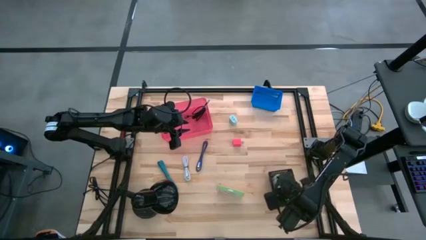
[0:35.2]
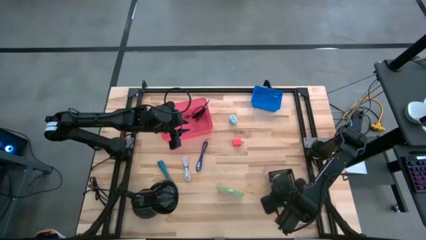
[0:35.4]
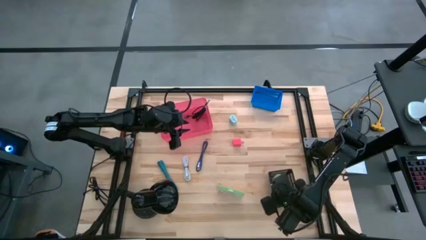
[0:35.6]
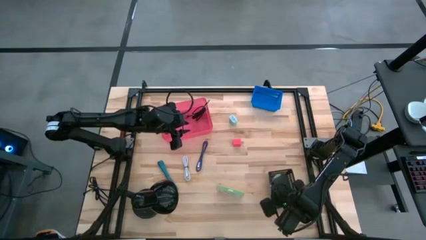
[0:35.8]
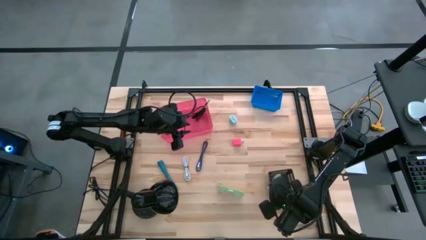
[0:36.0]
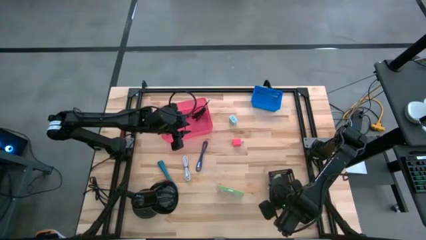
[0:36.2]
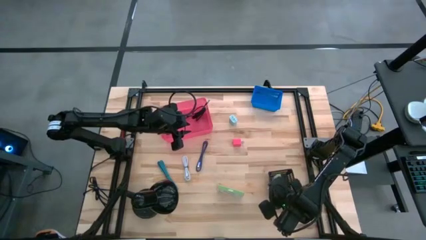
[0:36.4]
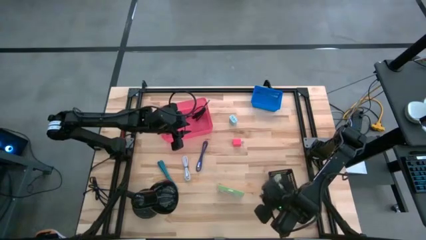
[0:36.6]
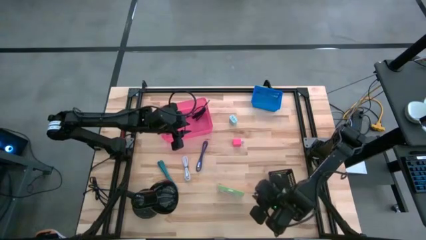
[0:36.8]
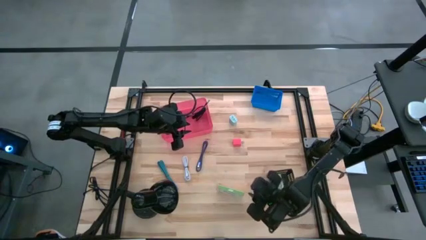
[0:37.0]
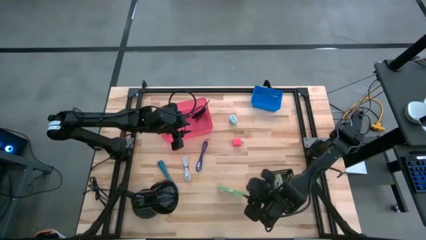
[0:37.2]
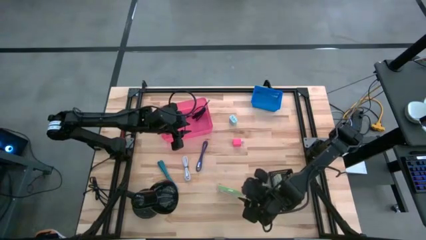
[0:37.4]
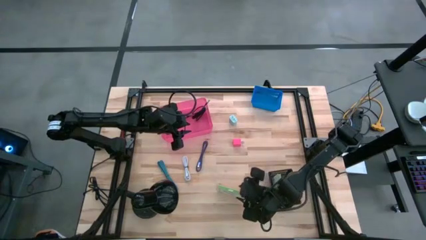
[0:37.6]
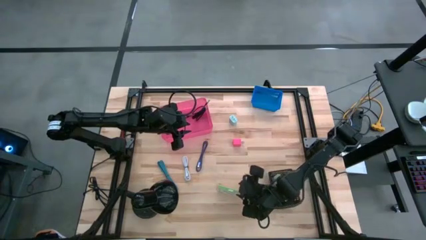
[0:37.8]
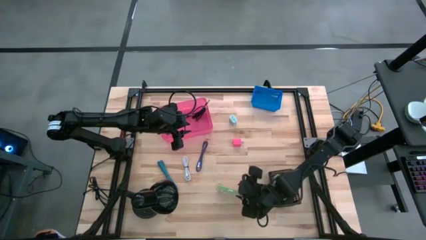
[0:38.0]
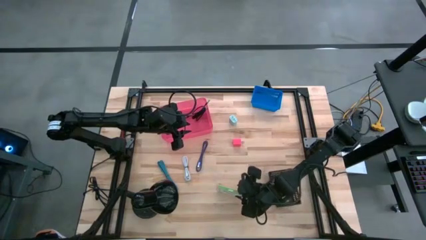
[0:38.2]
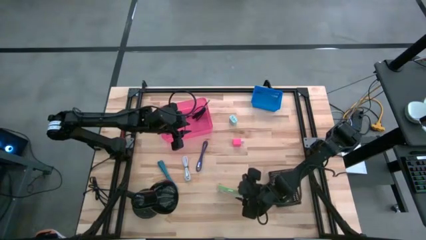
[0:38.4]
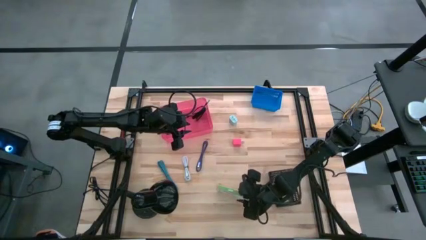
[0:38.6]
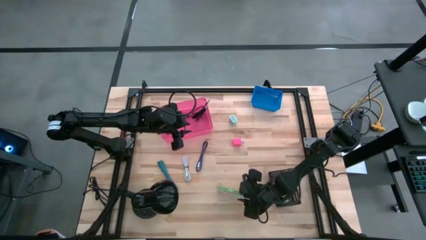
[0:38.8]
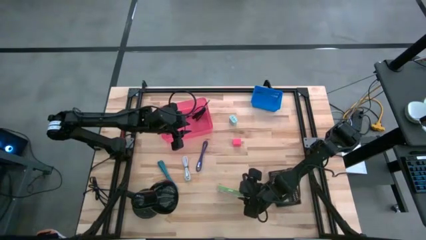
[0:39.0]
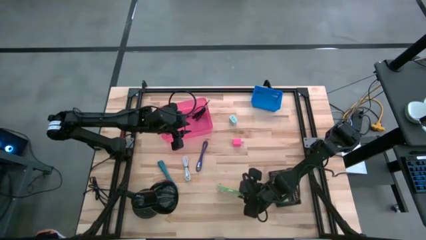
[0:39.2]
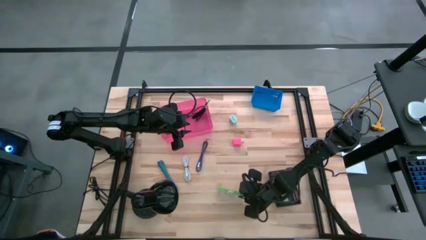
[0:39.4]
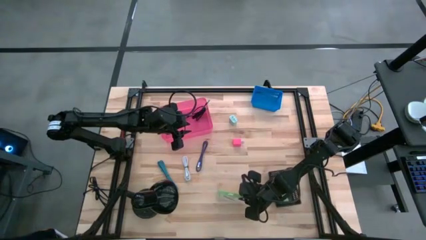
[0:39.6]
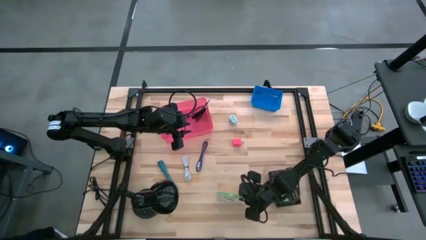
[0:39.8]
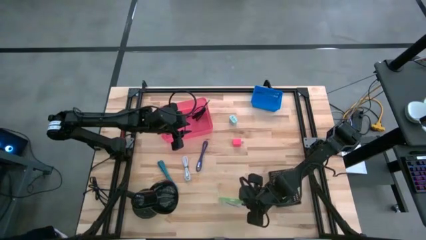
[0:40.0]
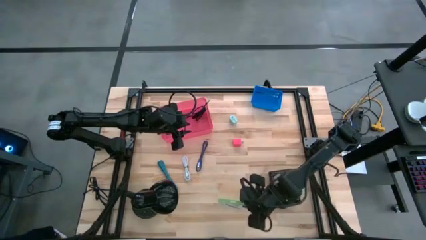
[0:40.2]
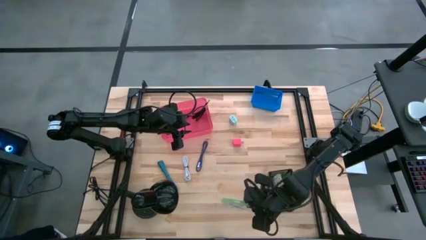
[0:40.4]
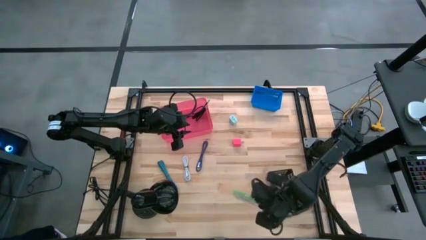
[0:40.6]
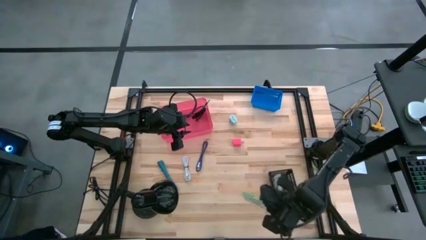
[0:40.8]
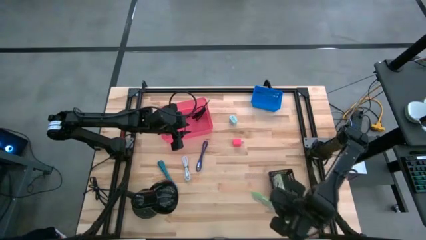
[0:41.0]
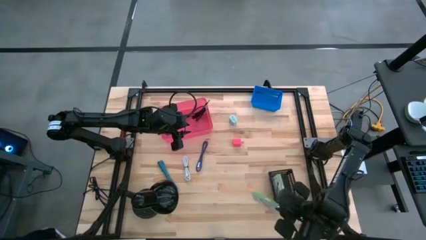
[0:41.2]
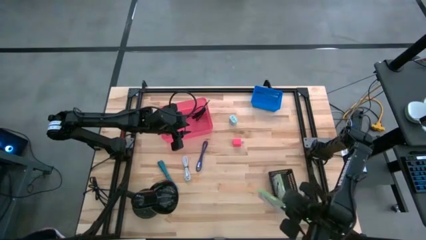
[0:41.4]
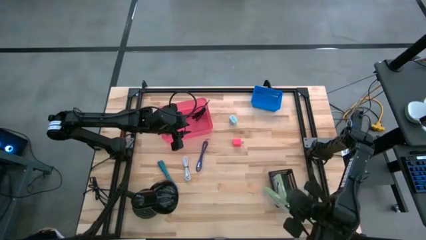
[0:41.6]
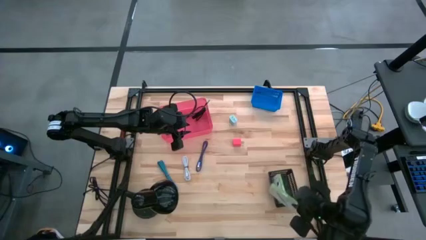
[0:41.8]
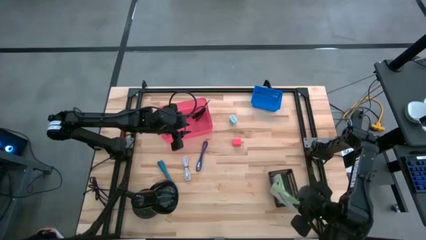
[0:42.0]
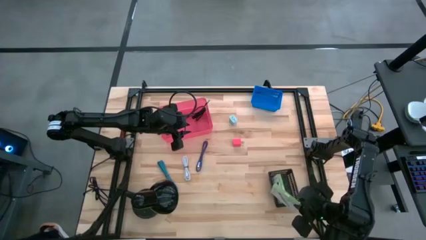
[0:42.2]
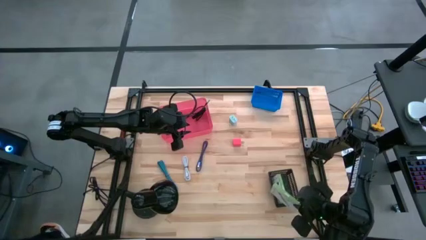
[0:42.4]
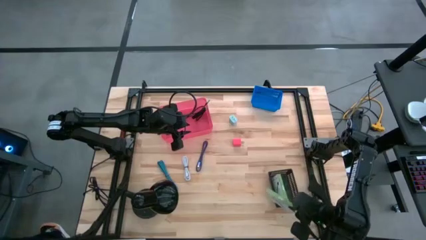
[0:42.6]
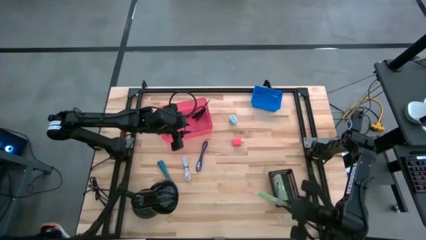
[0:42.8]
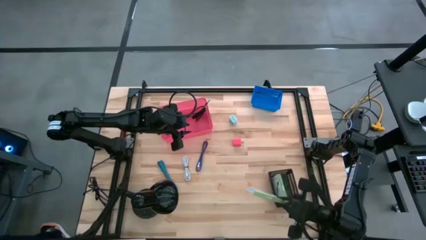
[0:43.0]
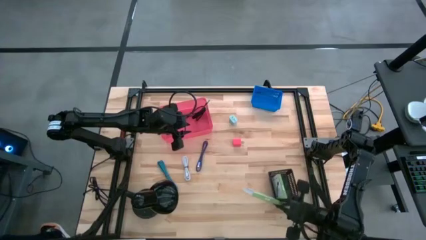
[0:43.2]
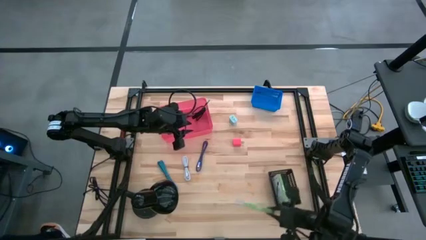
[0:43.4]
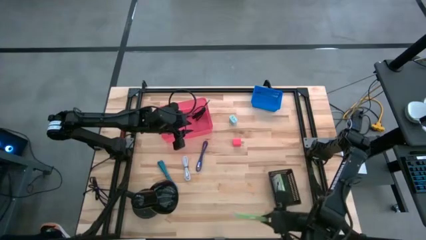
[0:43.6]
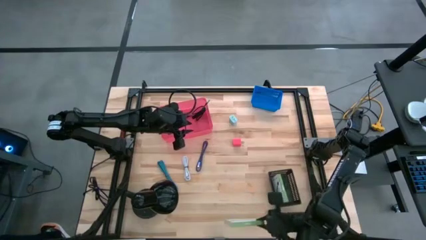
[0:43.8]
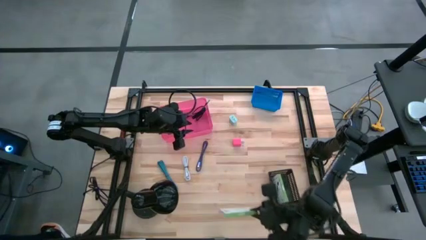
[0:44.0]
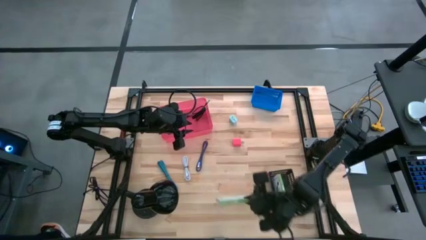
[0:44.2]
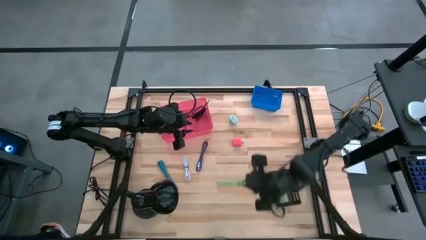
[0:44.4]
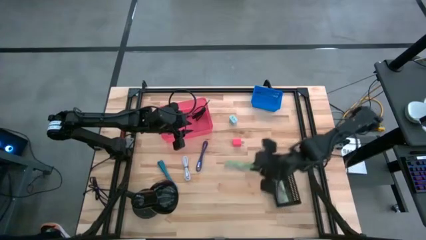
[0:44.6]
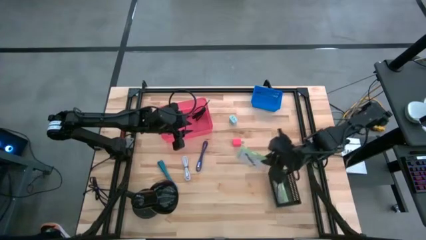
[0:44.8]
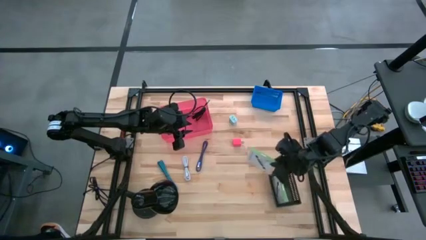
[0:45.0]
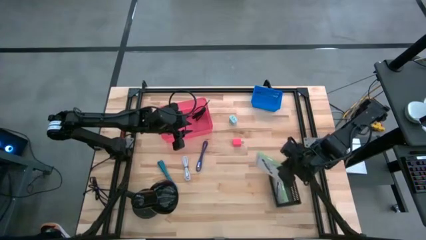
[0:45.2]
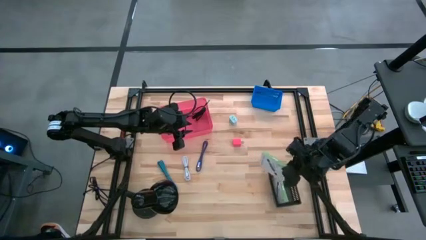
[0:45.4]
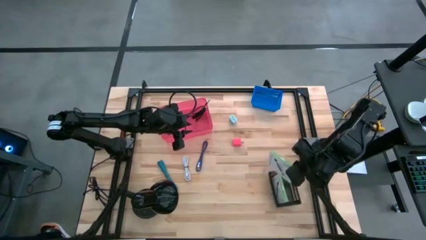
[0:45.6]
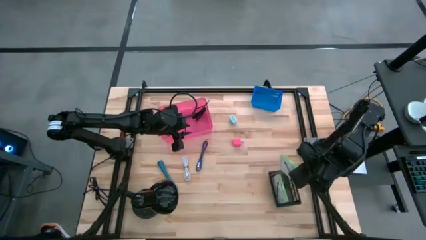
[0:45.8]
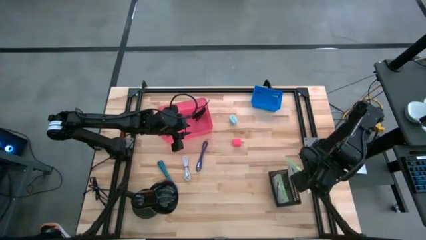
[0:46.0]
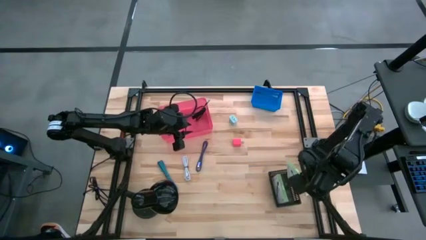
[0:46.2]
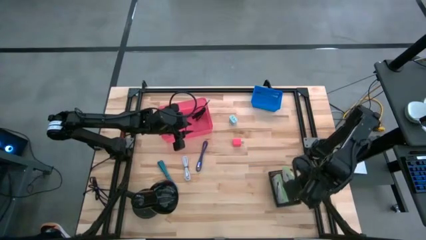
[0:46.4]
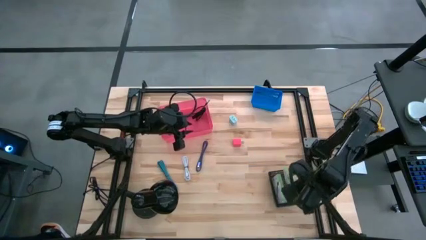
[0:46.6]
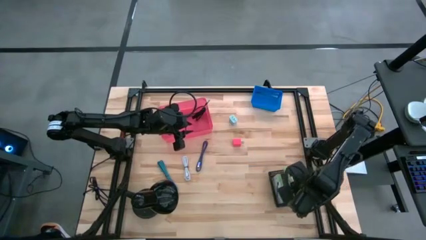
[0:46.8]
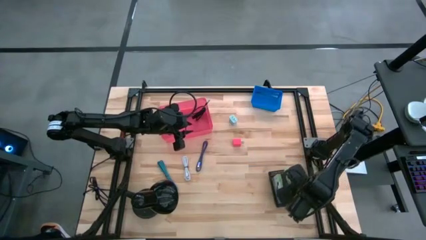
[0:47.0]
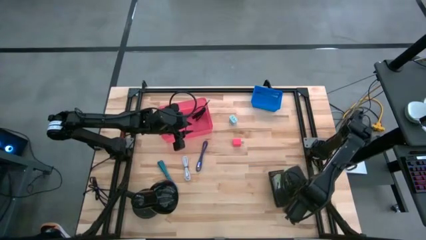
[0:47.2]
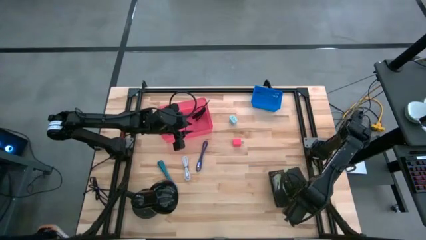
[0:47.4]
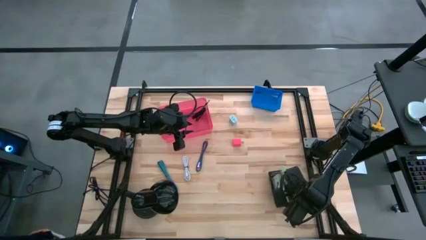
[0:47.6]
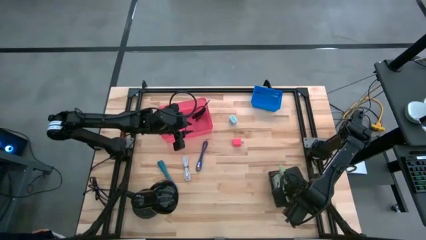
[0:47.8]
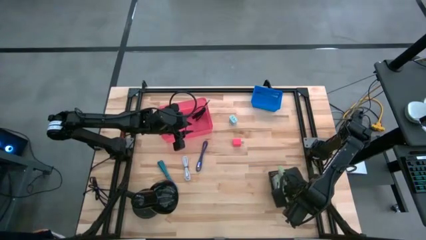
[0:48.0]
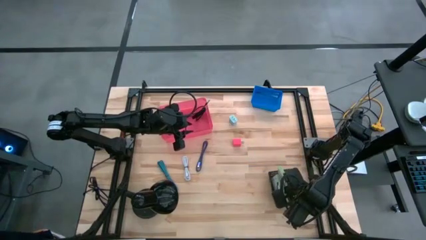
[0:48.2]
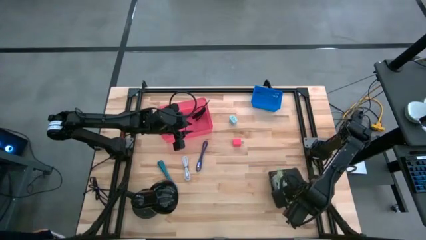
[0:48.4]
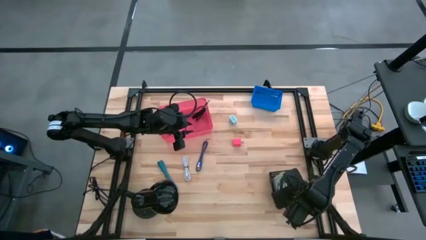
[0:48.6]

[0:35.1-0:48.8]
Task: Pick and place items into bin
Put the usb box into the black bin
